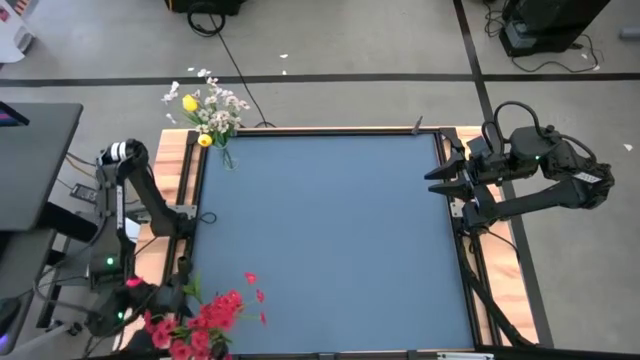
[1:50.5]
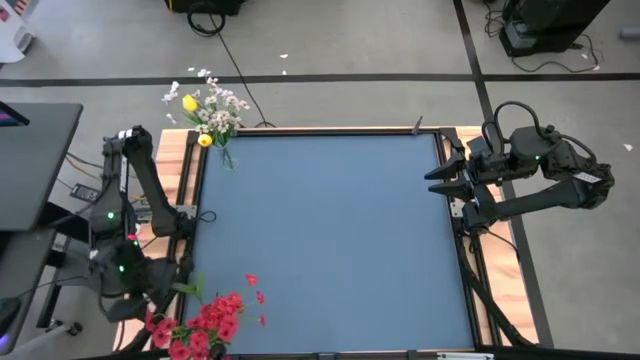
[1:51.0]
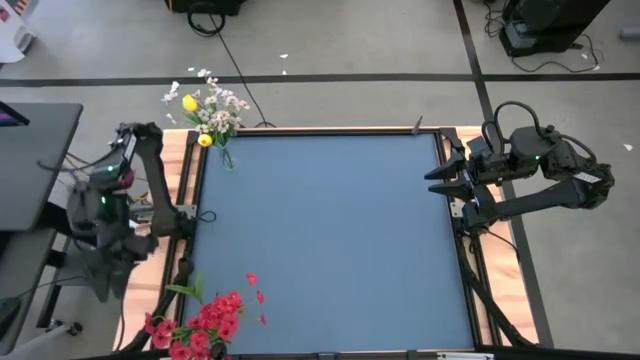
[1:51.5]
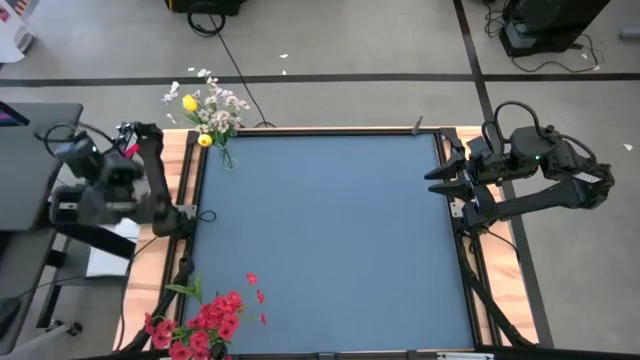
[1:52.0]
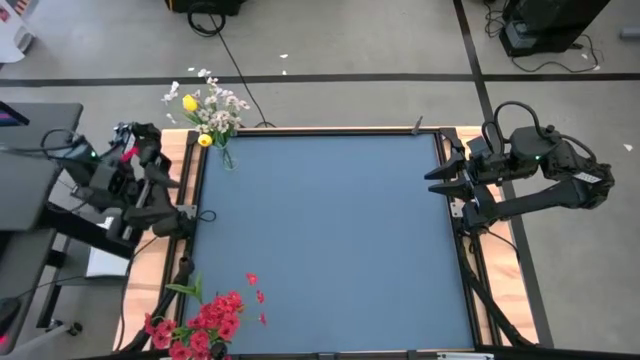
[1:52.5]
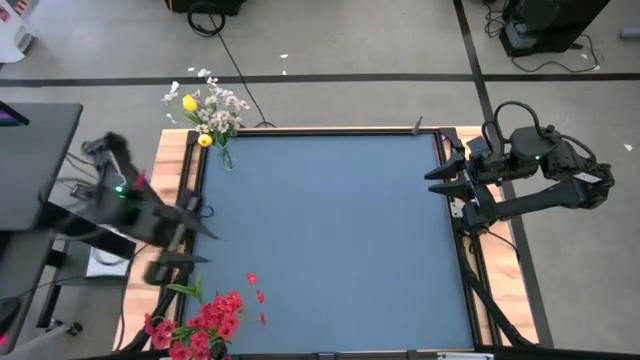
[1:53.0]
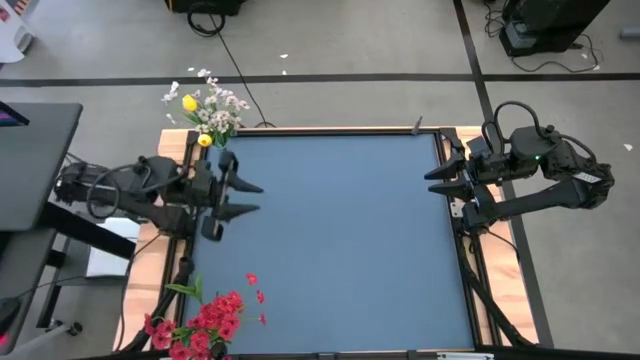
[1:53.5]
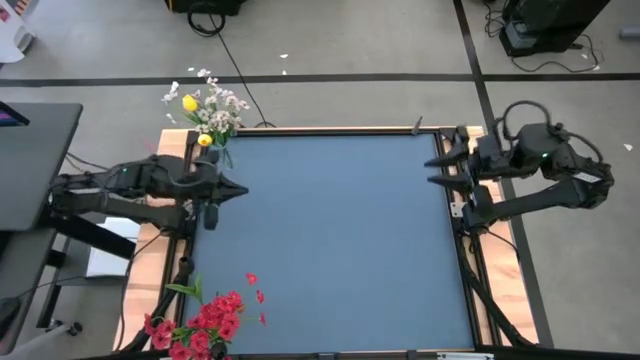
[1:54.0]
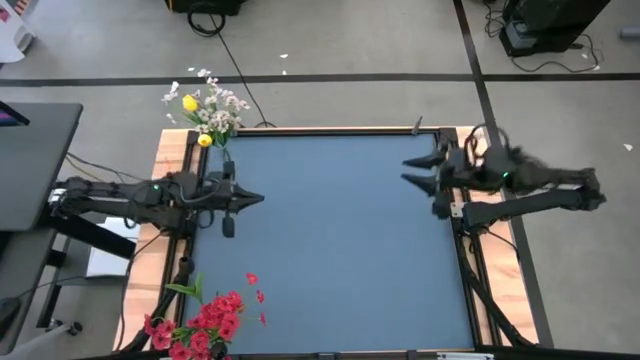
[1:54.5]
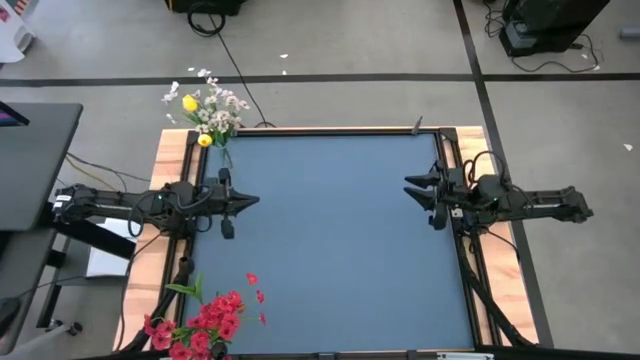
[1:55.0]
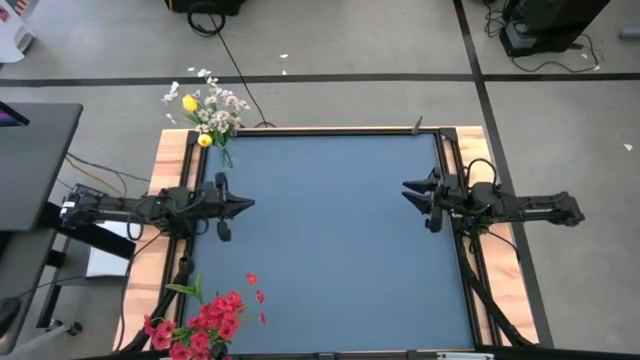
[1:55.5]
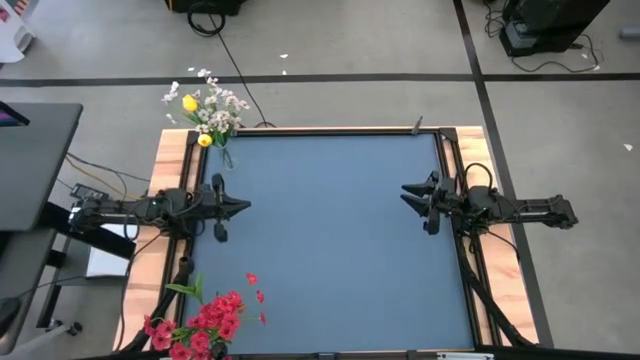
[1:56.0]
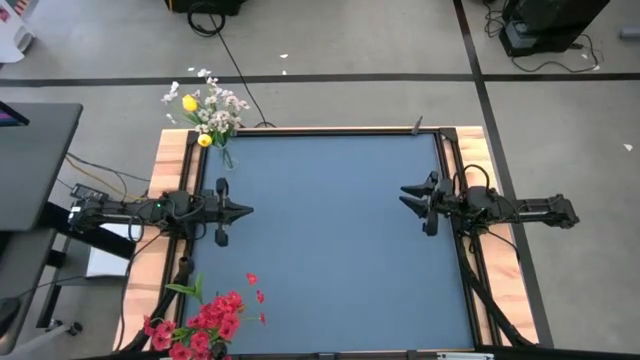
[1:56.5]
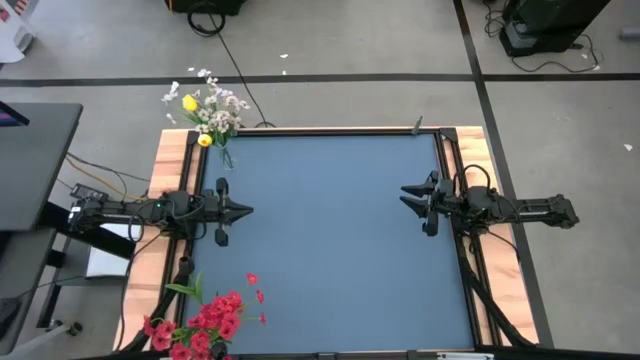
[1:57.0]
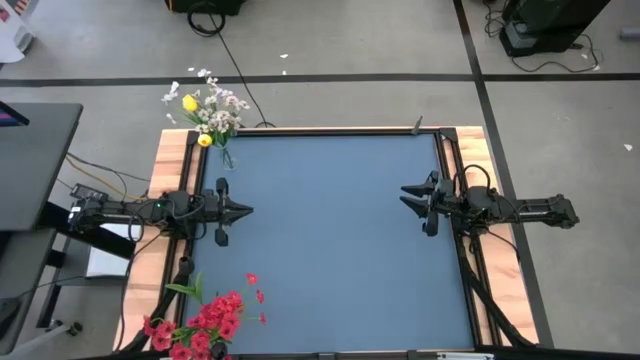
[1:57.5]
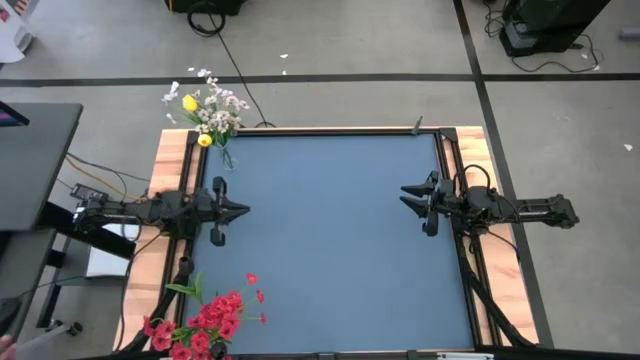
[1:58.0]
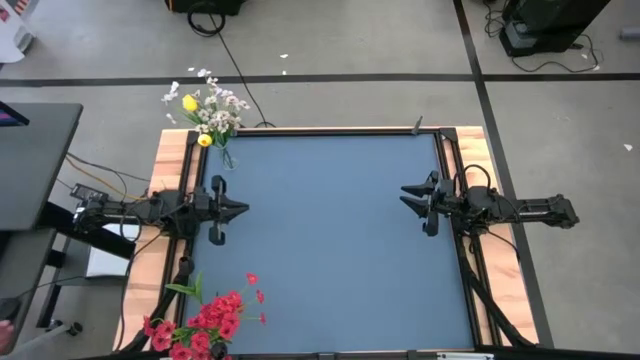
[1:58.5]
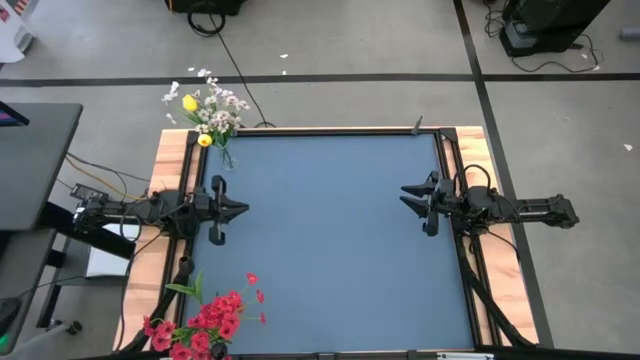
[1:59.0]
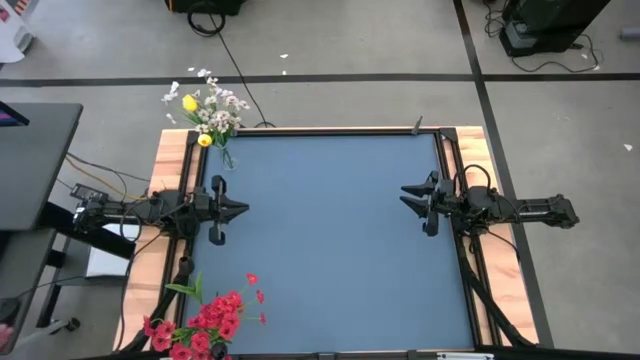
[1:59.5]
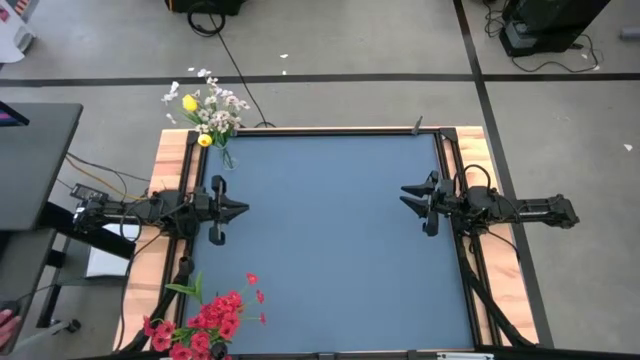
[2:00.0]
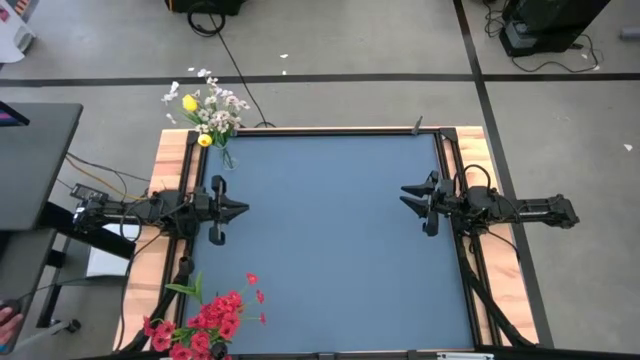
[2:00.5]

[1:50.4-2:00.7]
Task: Sort flowers into vase by color
Return to Home Position

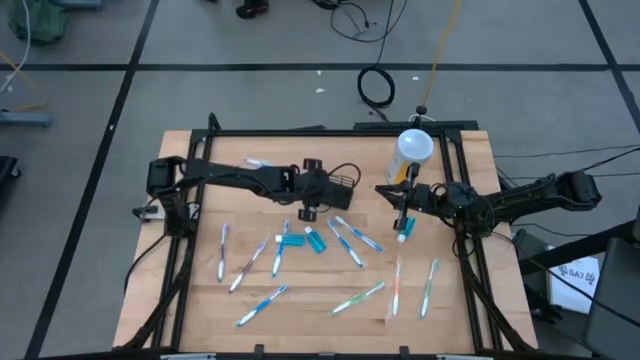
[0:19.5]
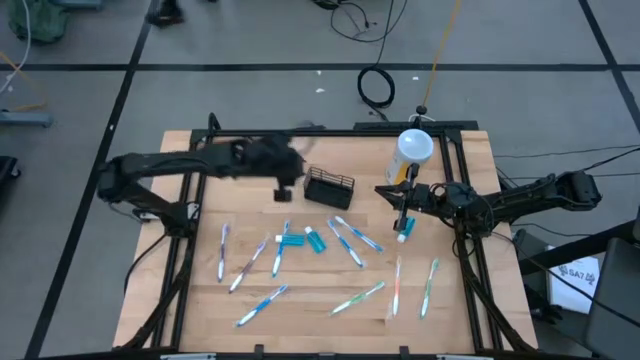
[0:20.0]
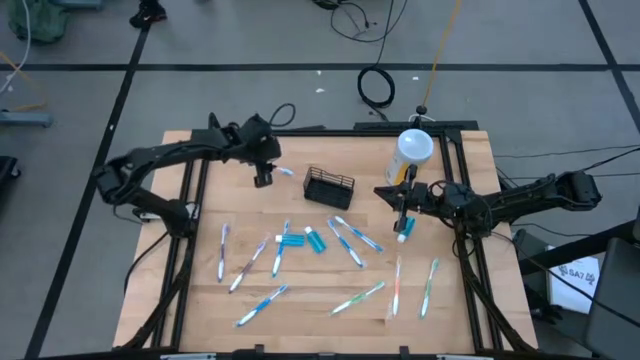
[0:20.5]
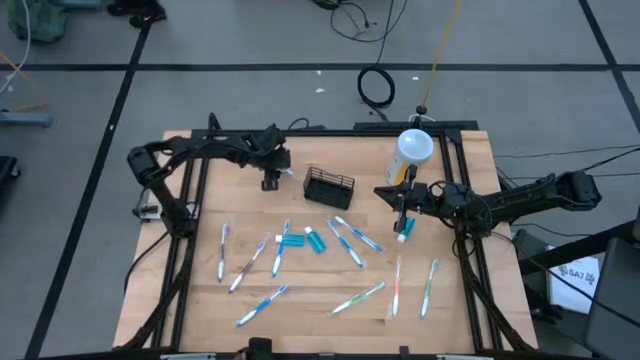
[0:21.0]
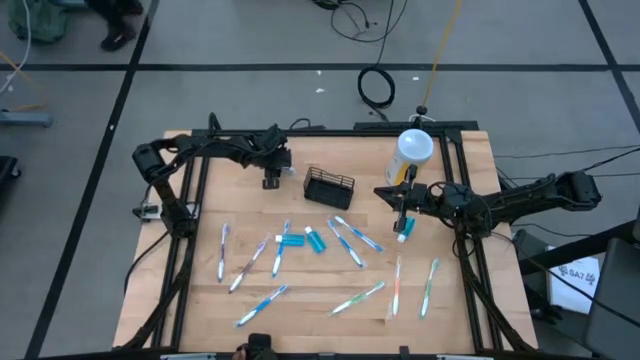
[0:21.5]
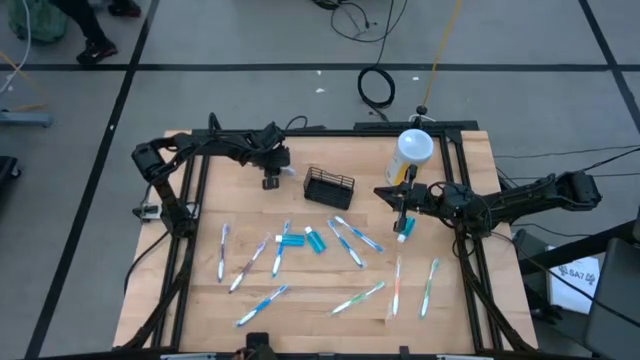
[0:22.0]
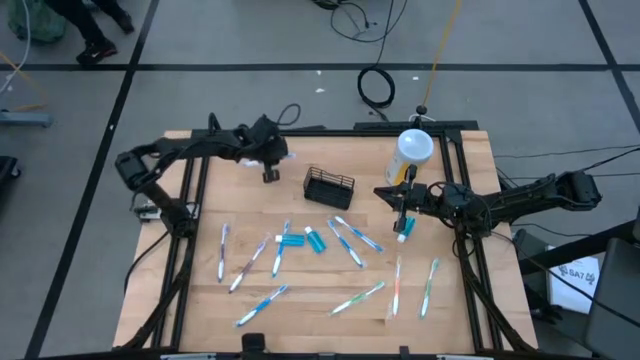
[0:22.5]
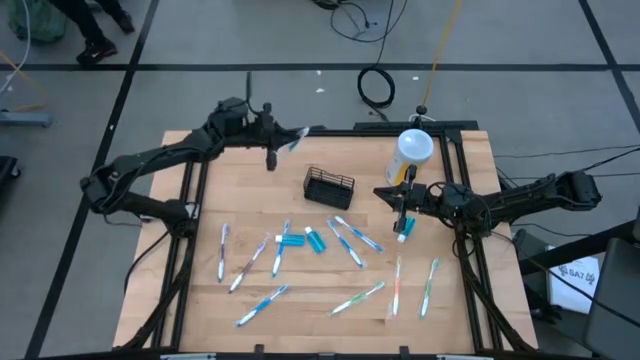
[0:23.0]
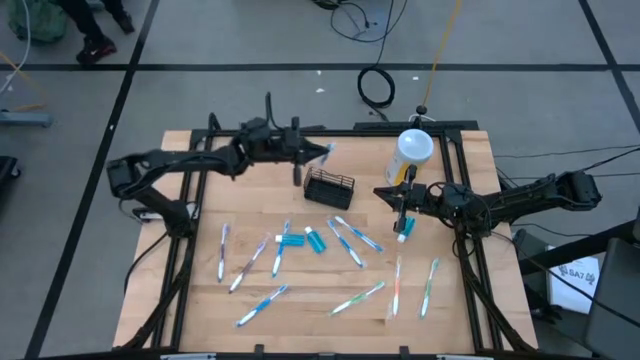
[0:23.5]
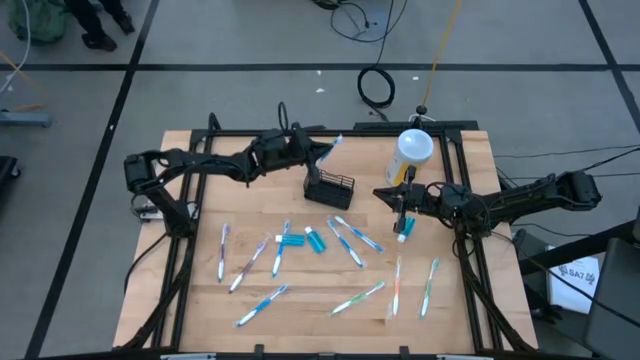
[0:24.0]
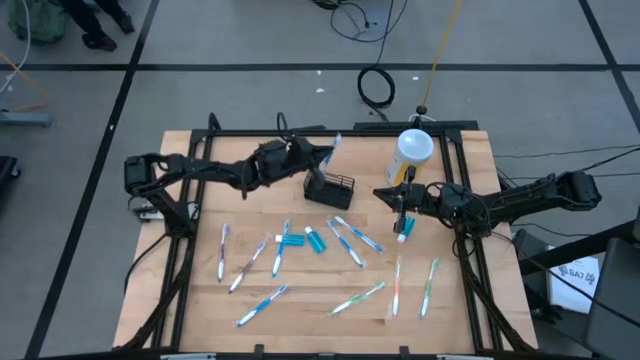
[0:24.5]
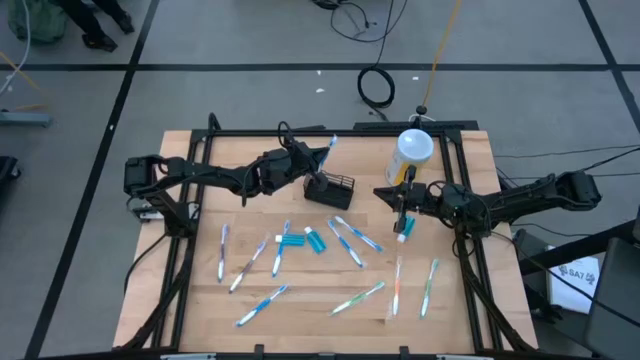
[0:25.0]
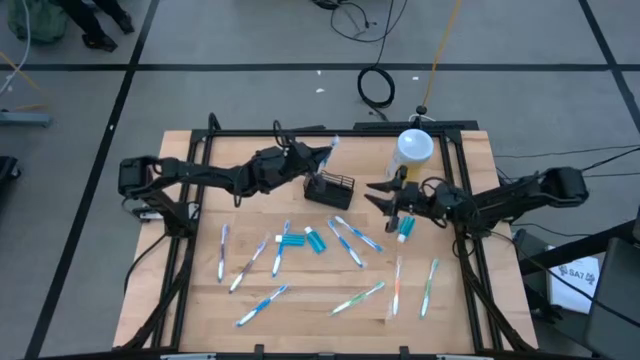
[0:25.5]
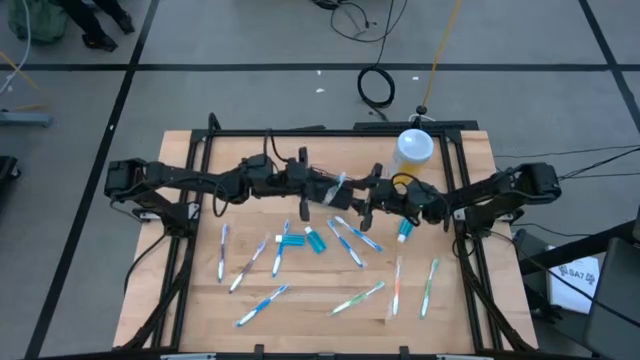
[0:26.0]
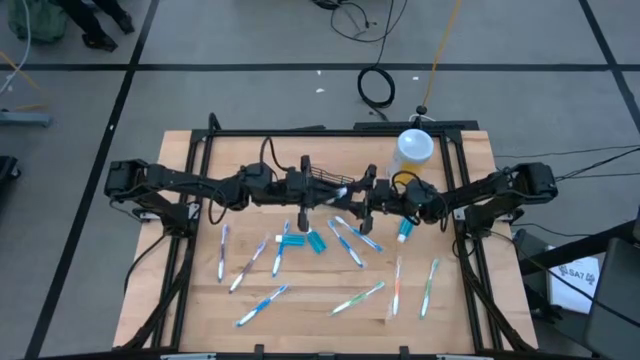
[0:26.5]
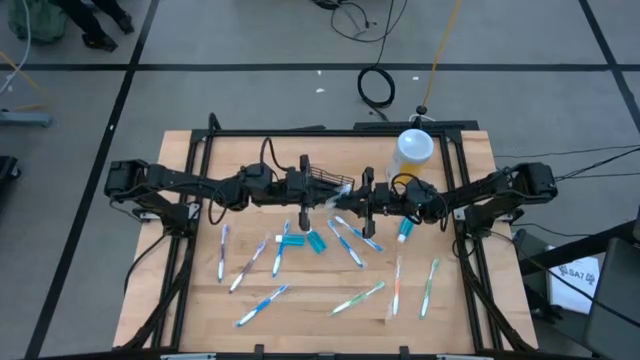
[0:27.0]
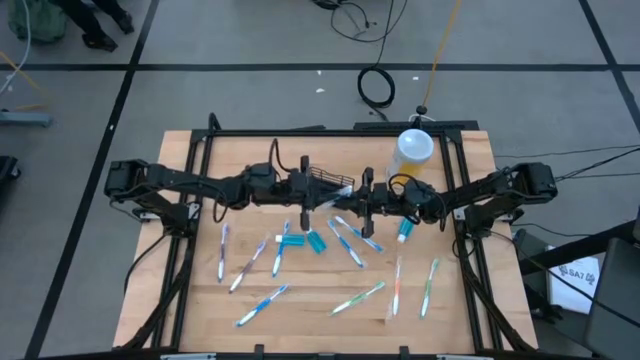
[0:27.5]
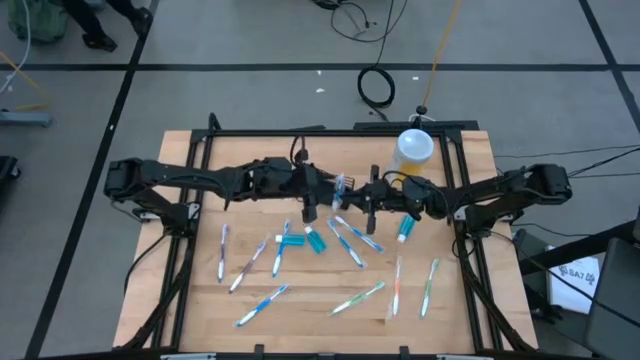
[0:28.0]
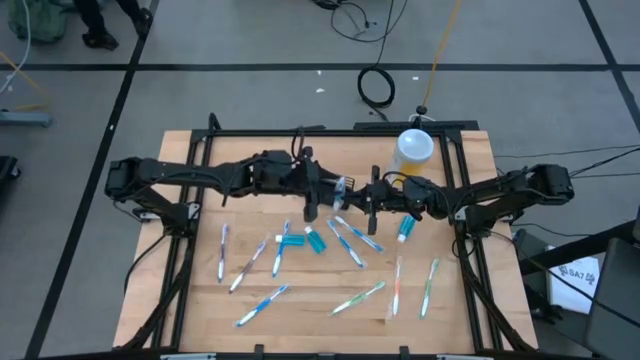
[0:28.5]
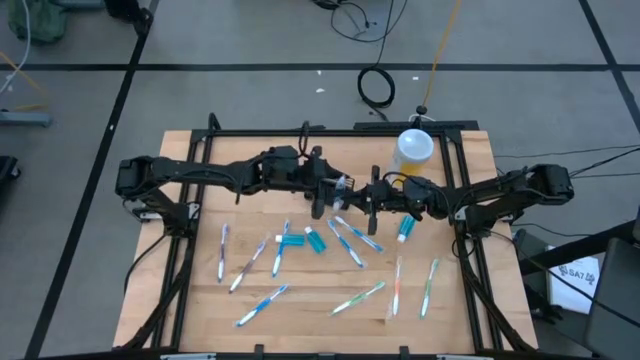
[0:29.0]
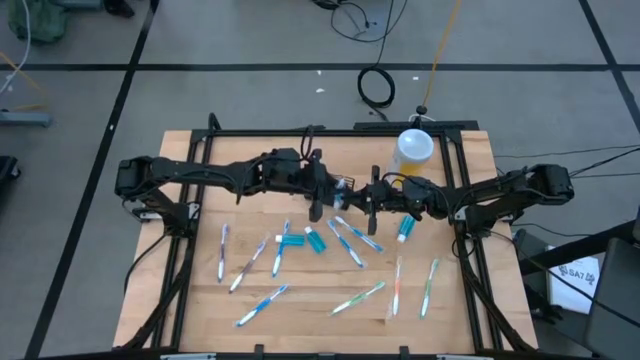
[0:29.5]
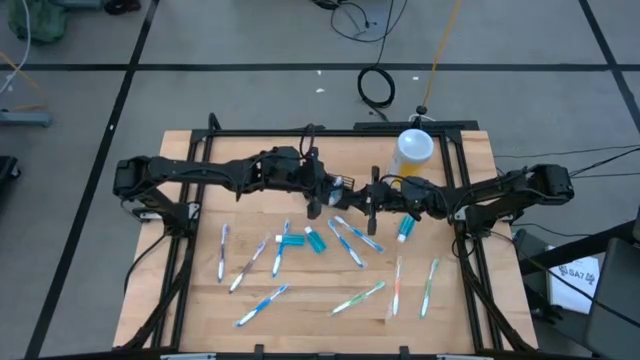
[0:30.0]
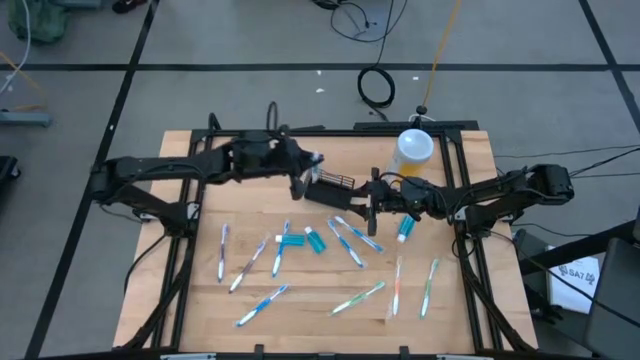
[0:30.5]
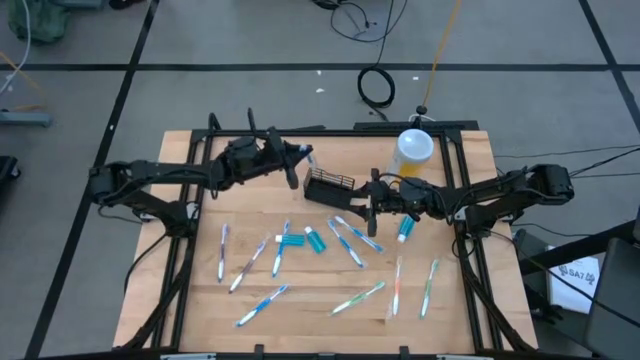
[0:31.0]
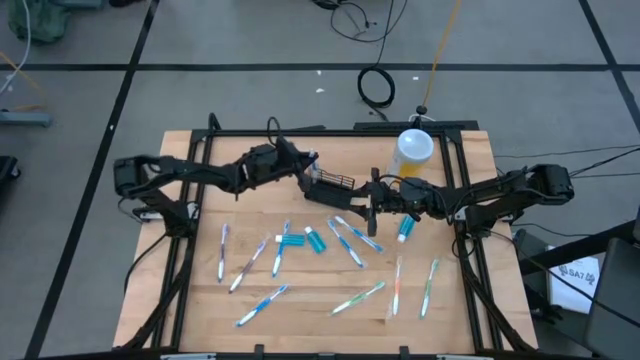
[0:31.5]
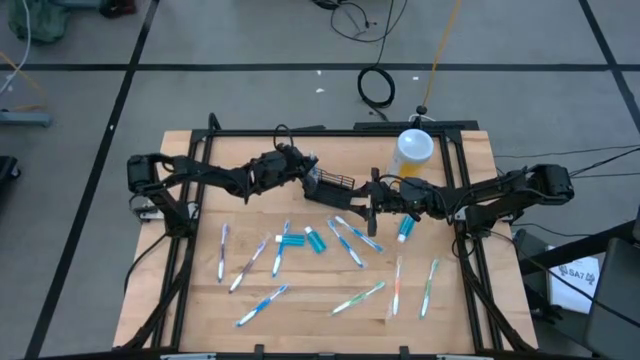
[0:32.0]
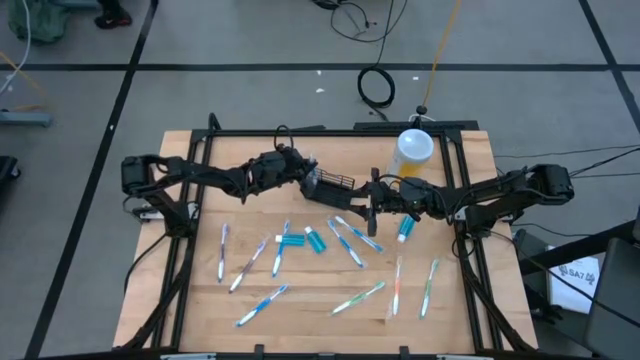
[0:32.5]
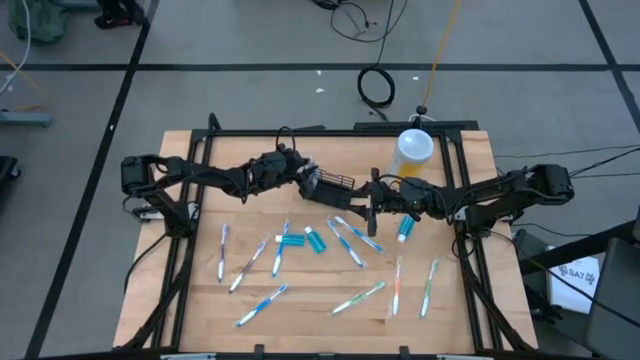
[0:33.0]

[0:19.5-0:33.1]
Task: Pick & Place toothbrushing station
Put the blue toothbrush into the black wire organizer
